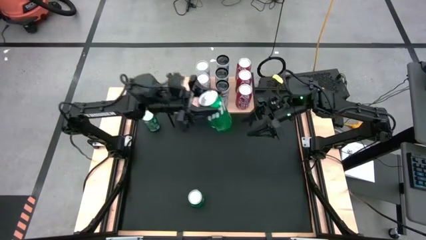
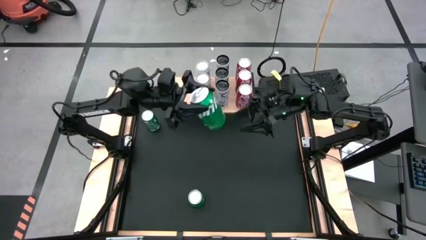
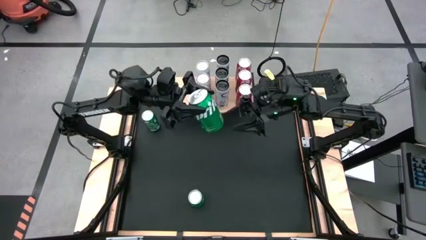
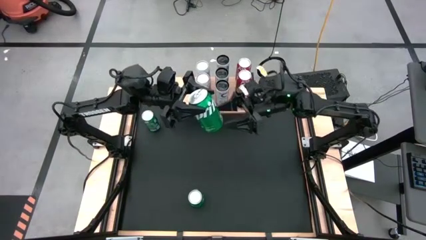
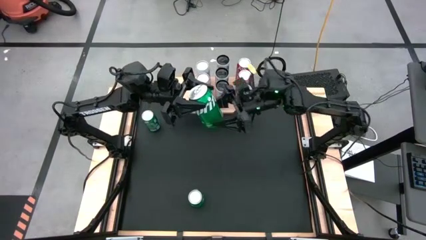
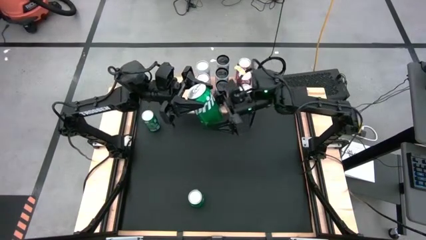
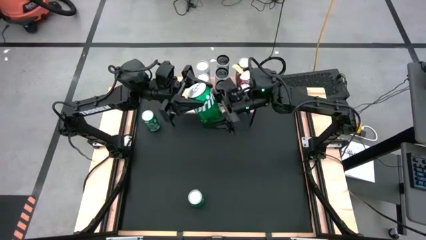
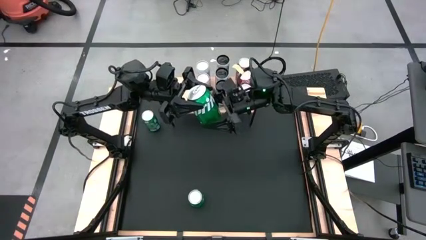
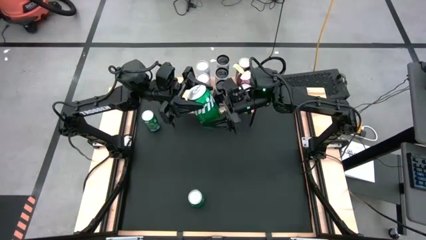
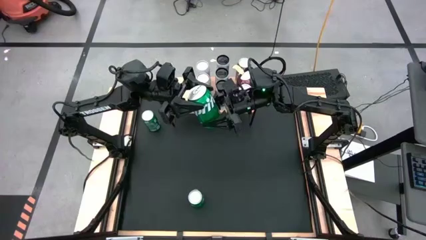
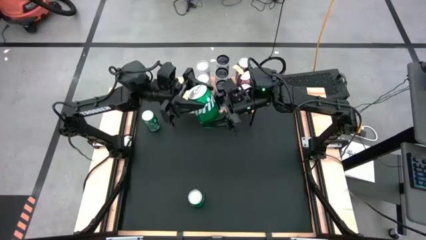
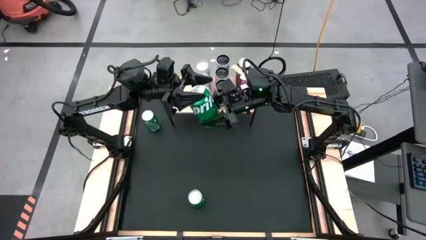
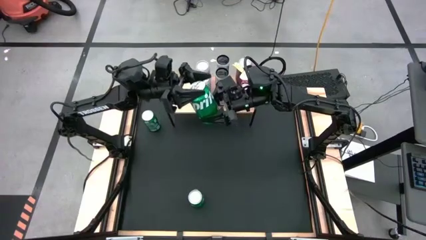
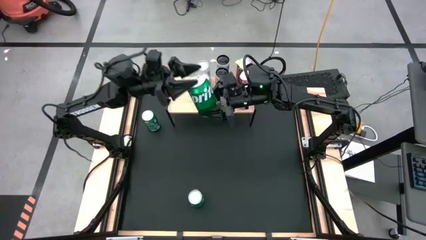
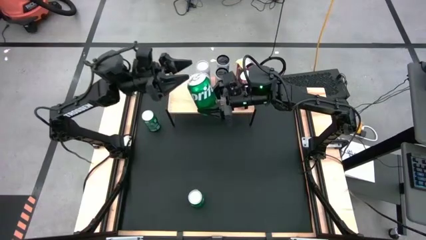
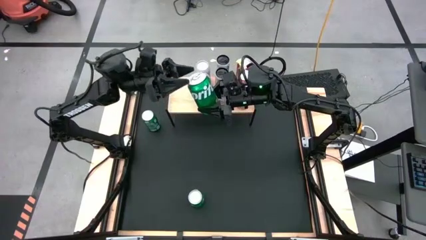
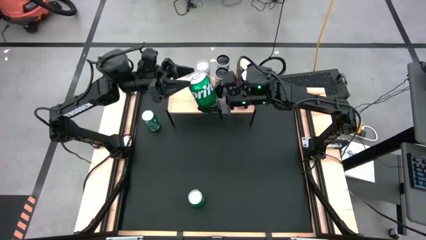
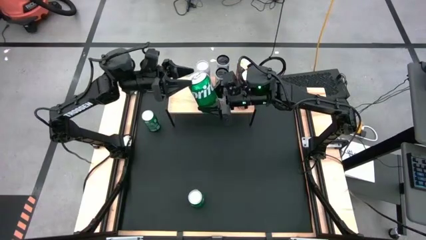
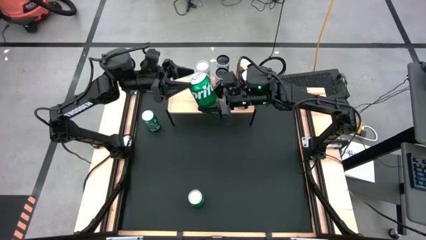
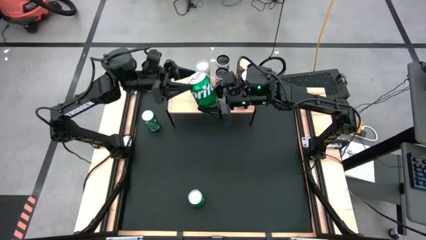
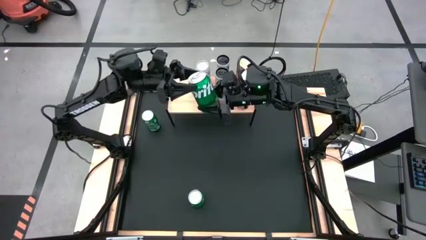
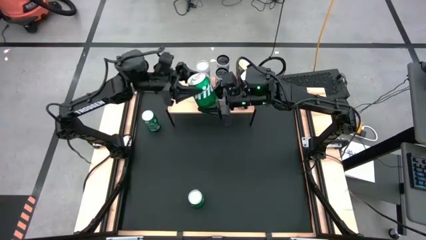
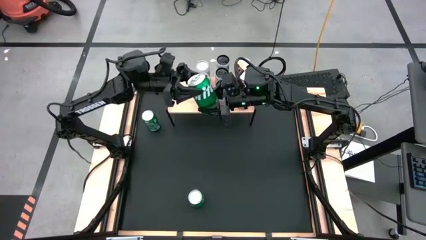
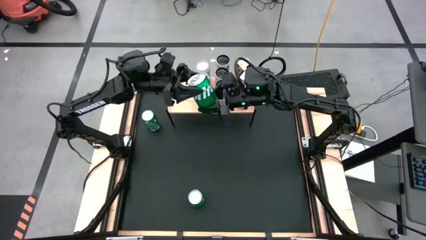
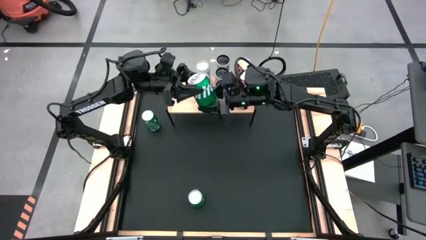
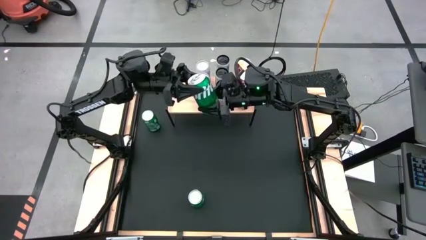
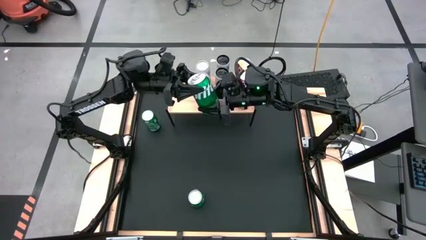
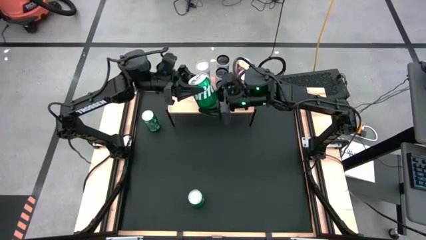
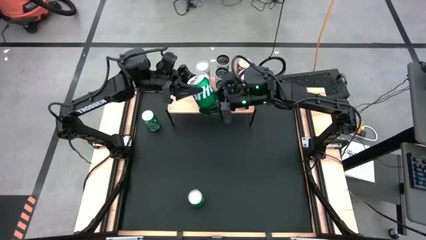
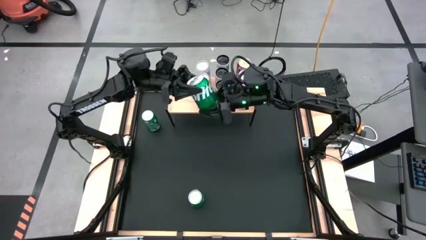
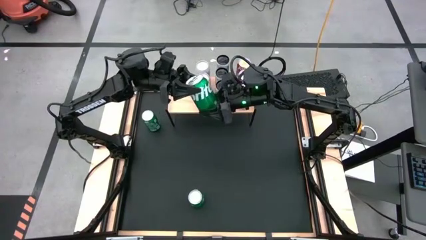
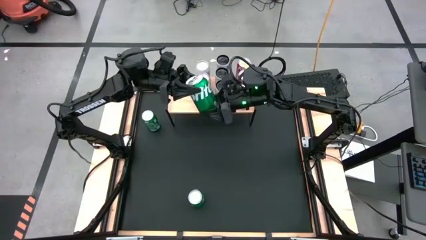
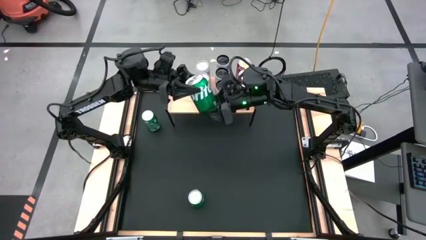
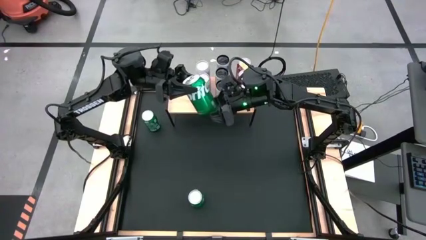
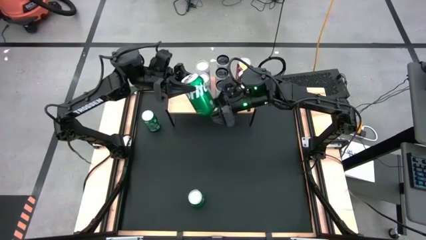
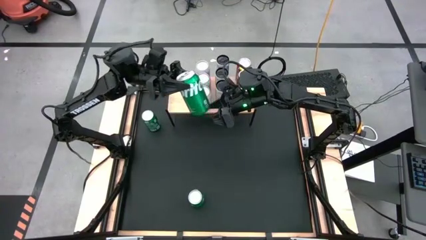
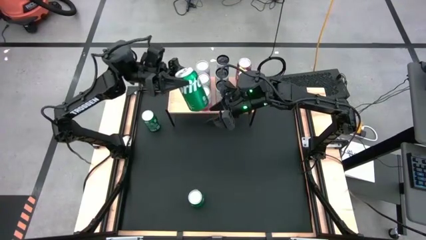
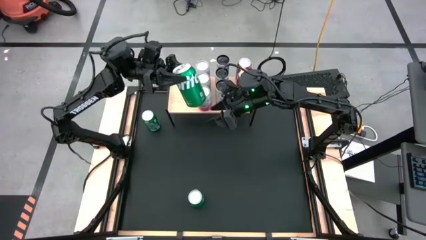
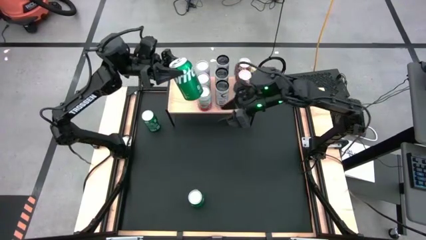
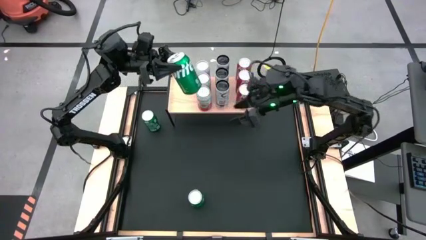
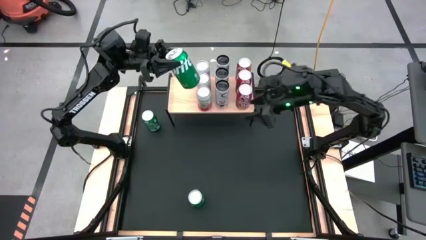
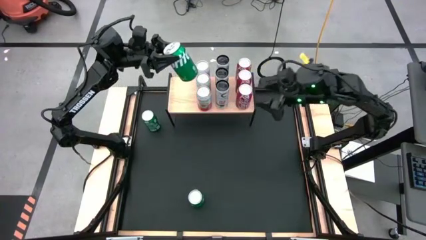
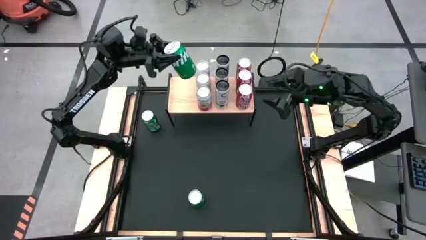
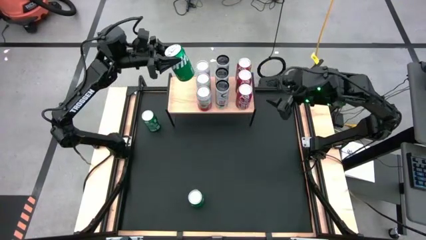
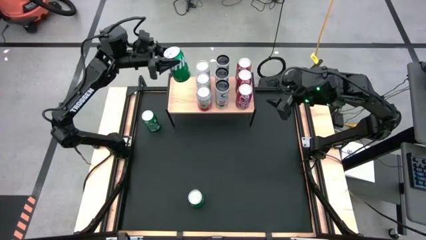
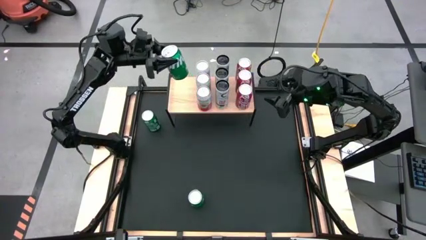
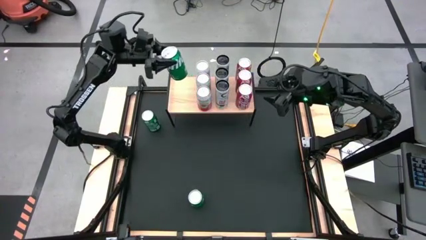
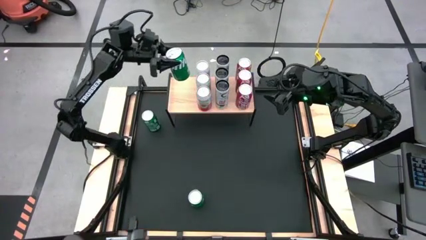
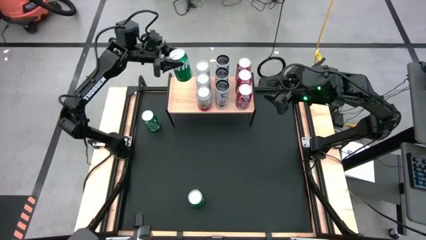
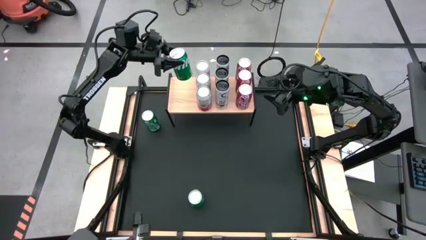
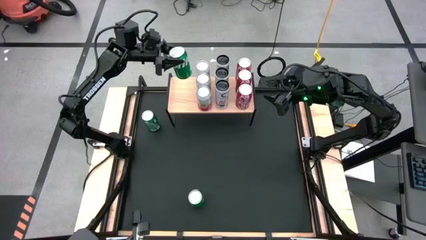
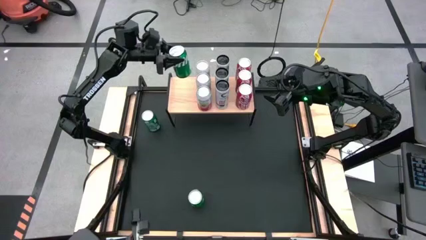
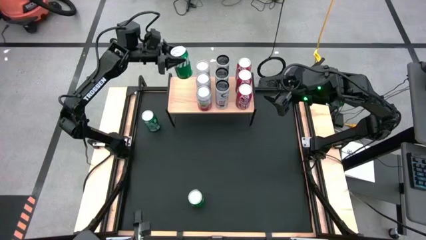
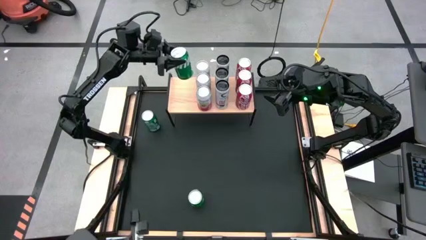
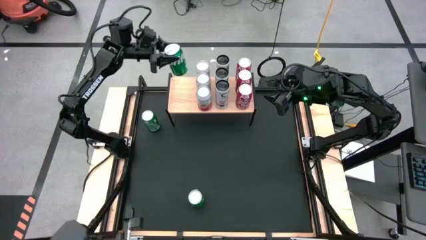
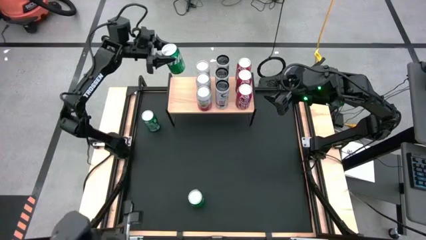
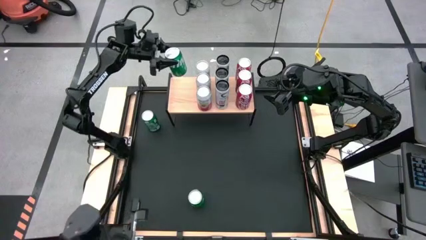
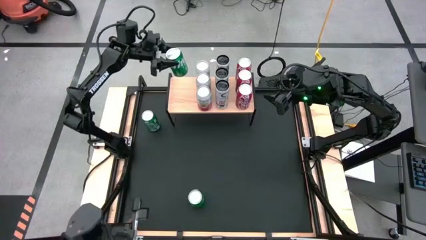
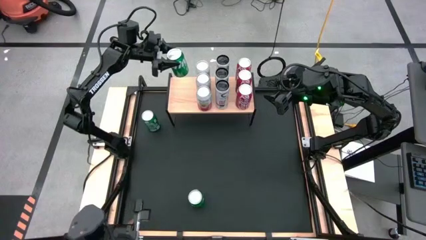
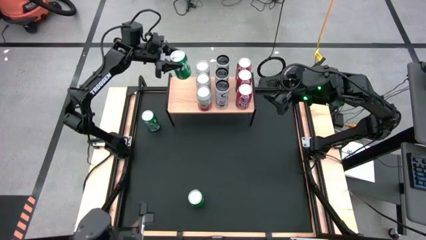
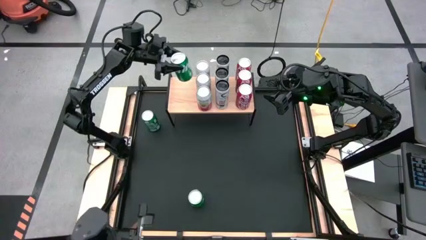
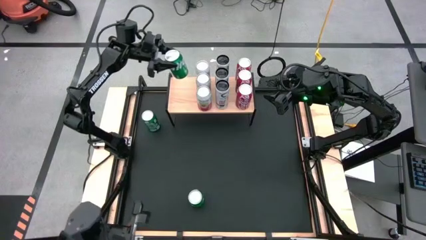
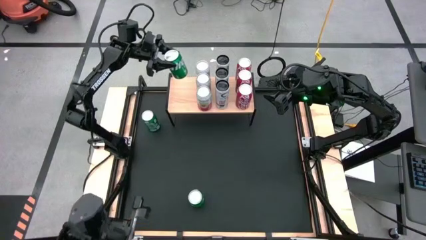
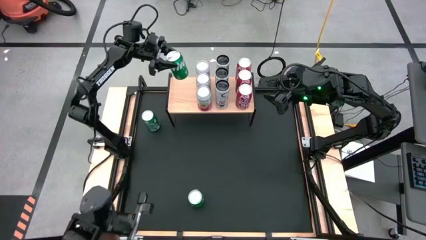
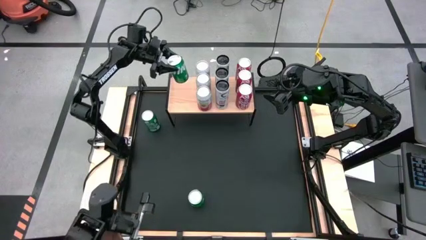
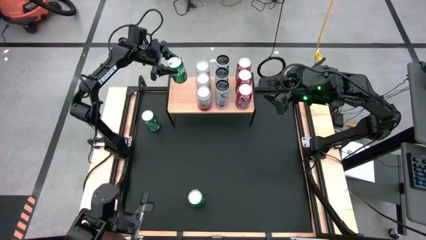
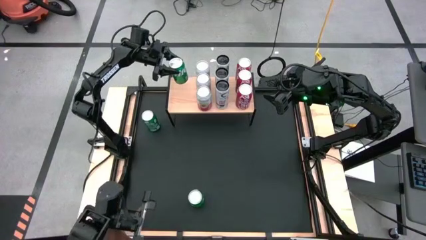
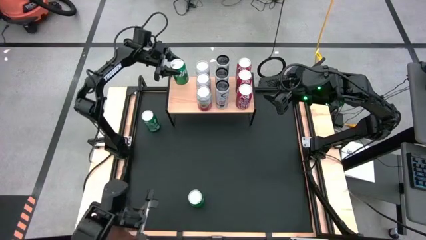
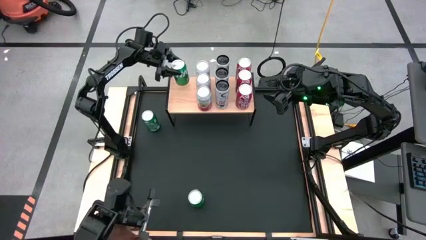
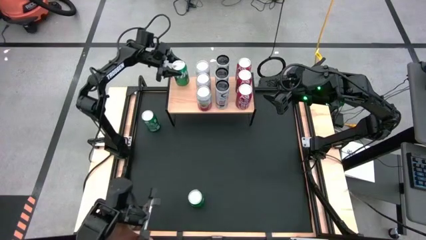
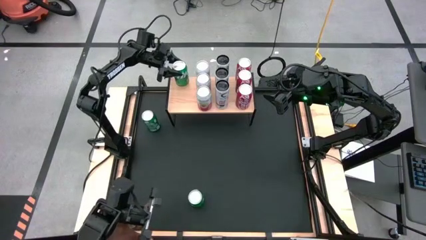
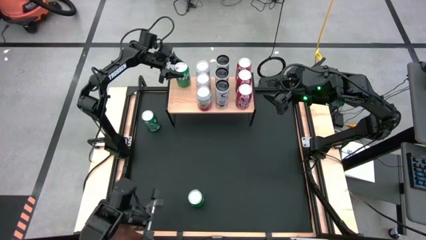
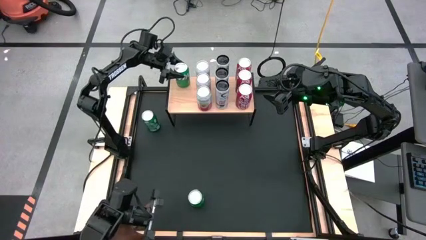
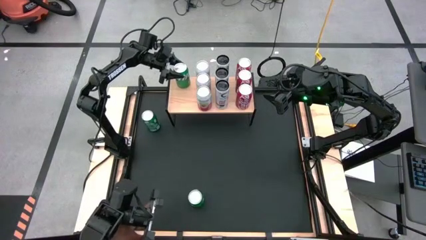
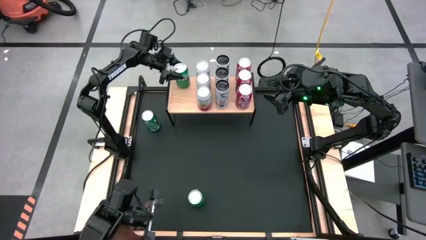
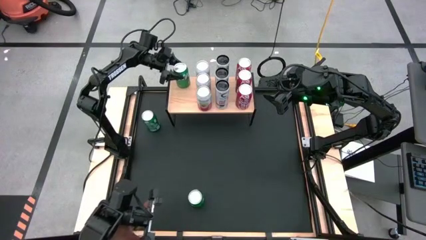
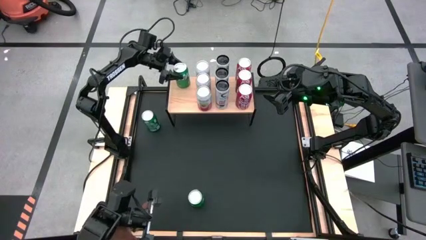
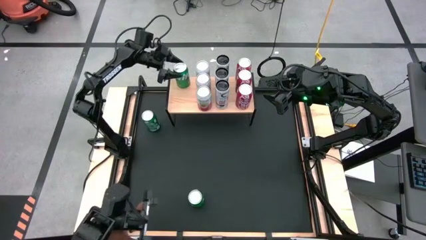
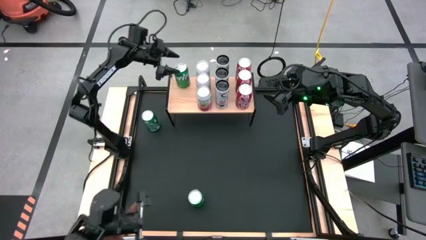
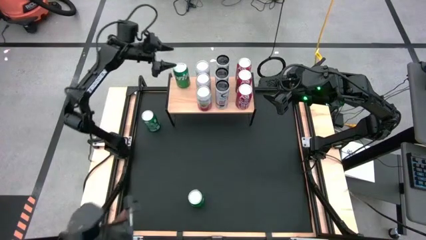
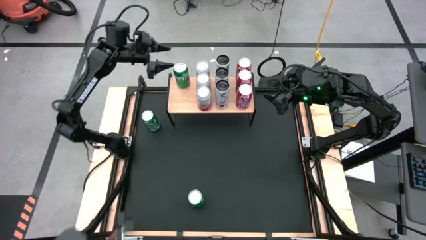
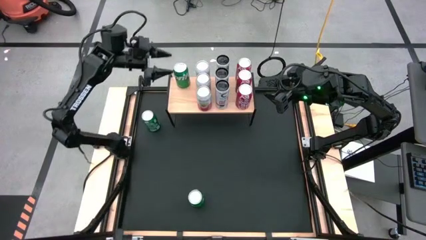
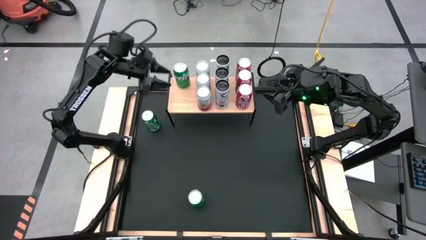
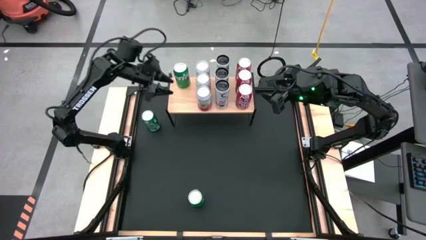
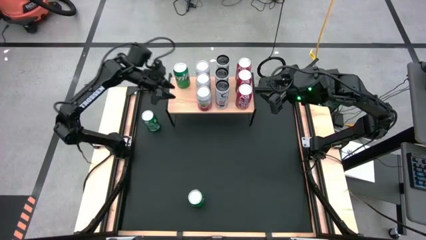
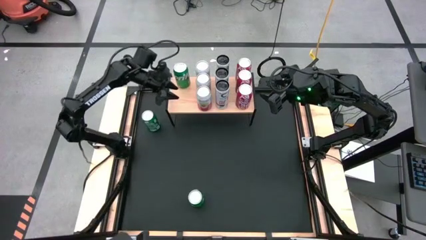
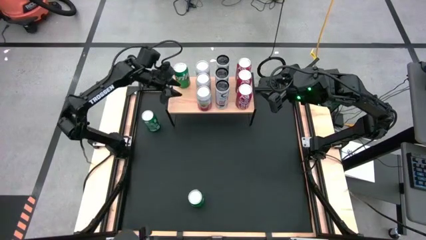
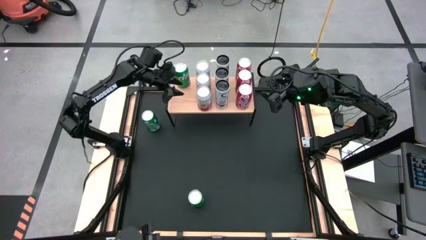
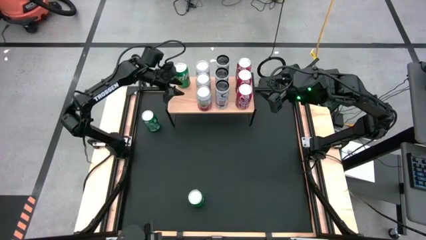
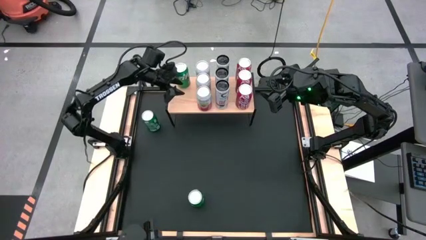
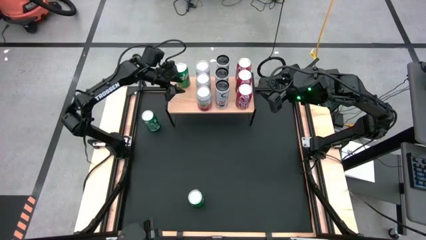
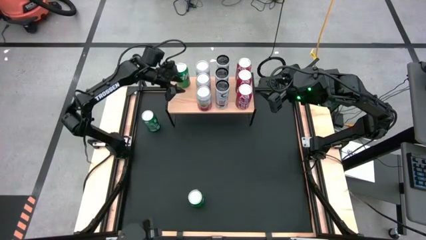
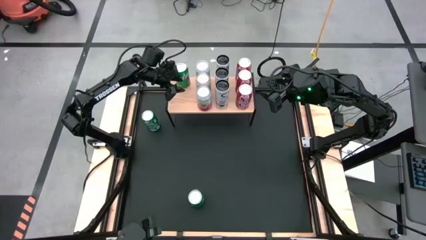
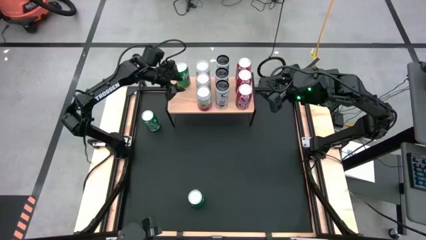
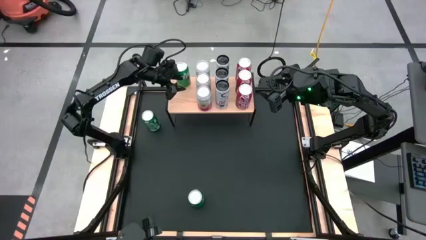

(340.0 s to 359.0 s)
Task: Place canned beverage on shelf
Put the middle green soda can on the shelf
